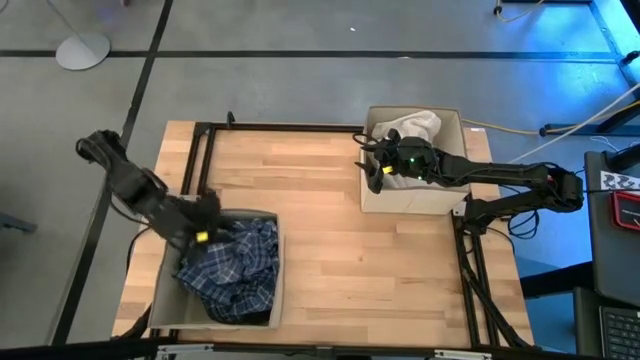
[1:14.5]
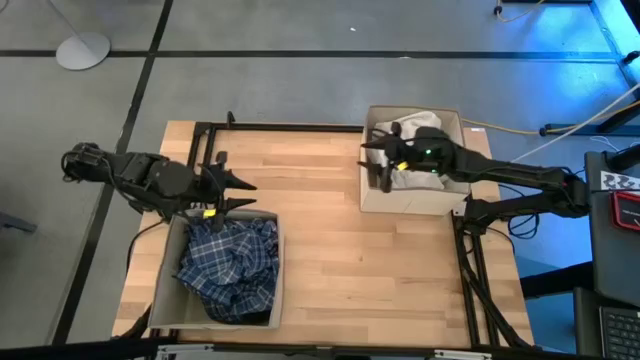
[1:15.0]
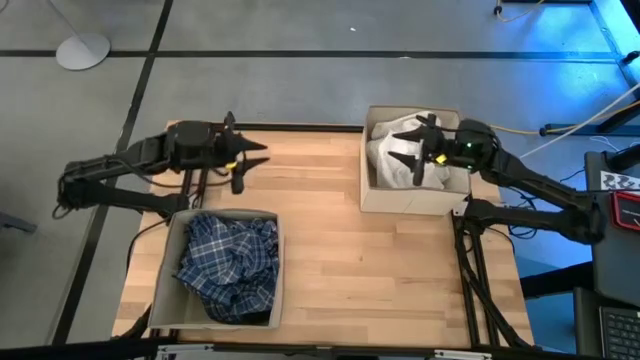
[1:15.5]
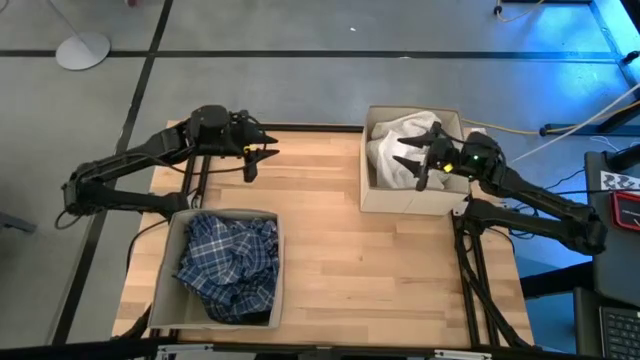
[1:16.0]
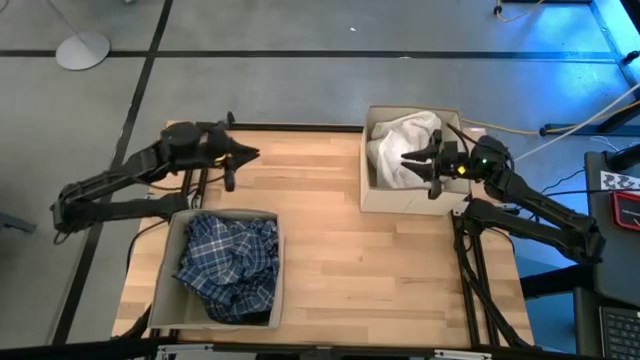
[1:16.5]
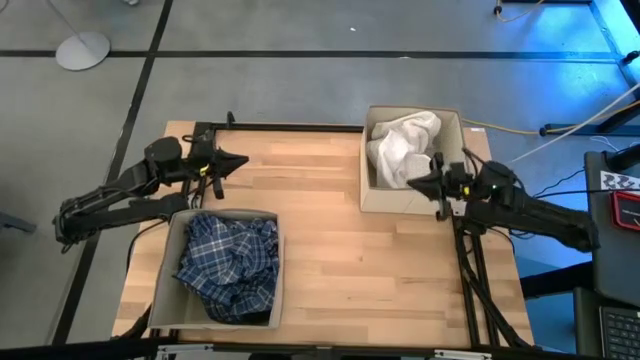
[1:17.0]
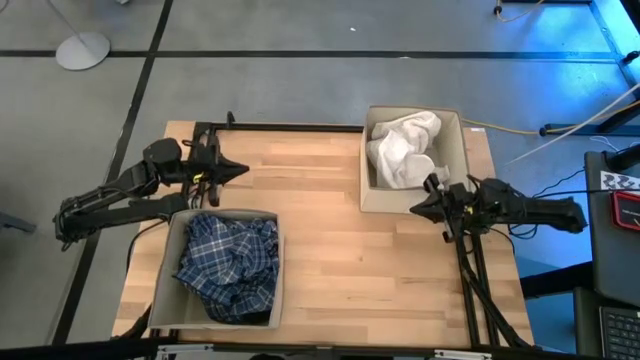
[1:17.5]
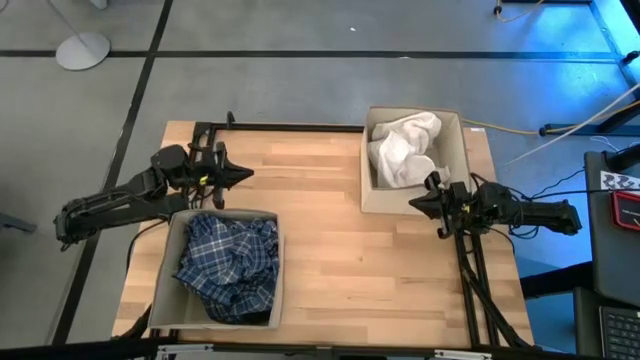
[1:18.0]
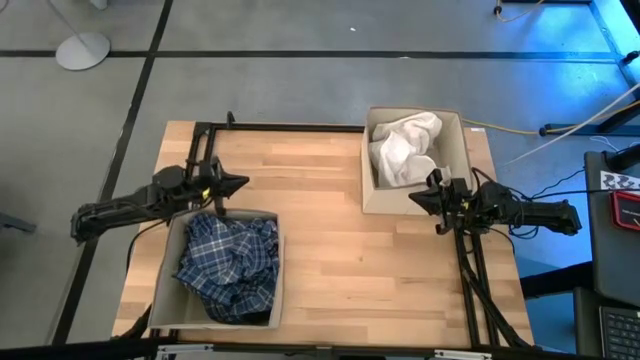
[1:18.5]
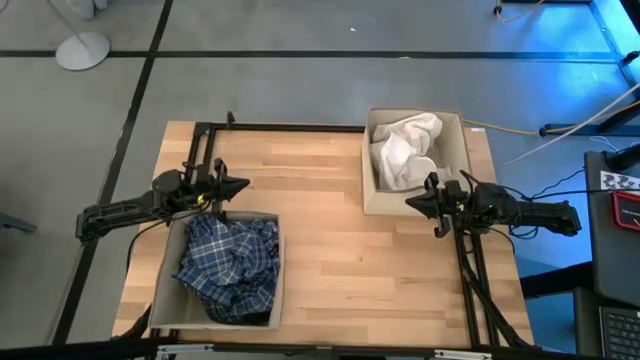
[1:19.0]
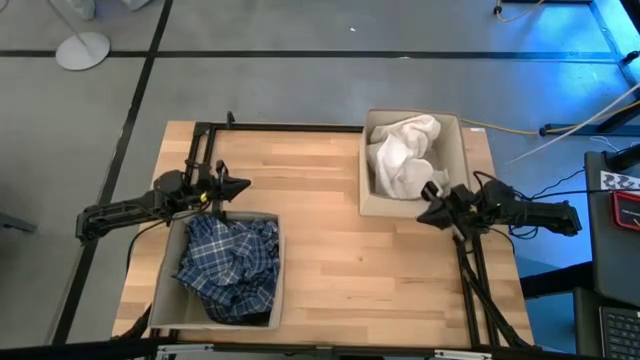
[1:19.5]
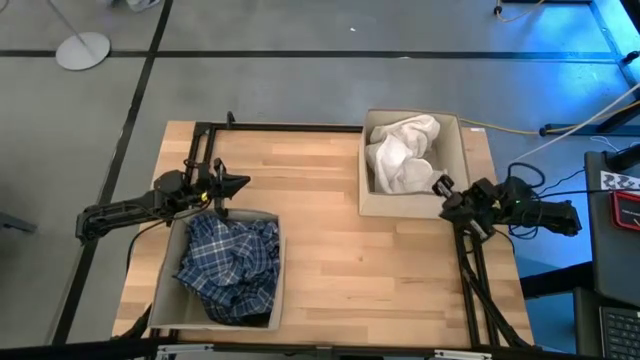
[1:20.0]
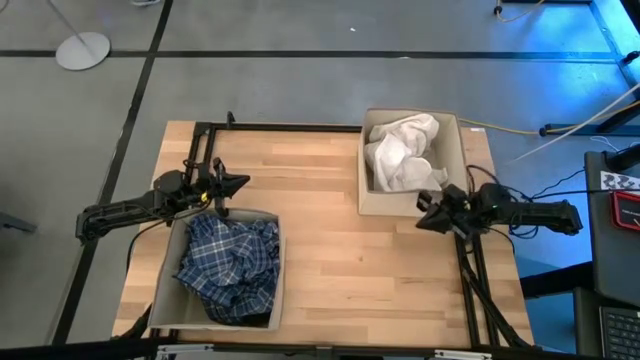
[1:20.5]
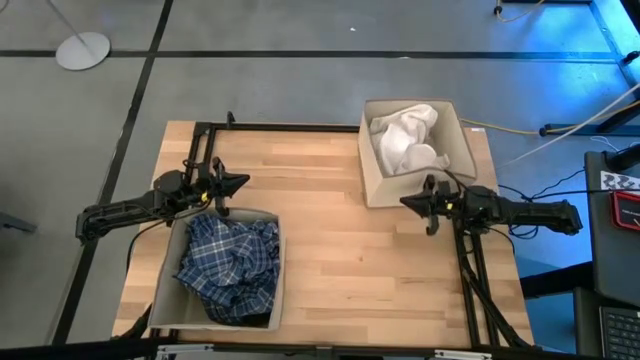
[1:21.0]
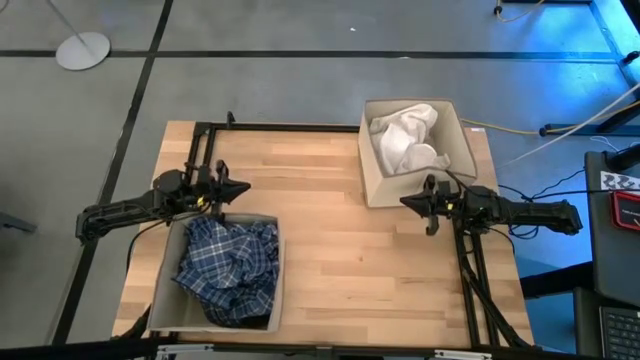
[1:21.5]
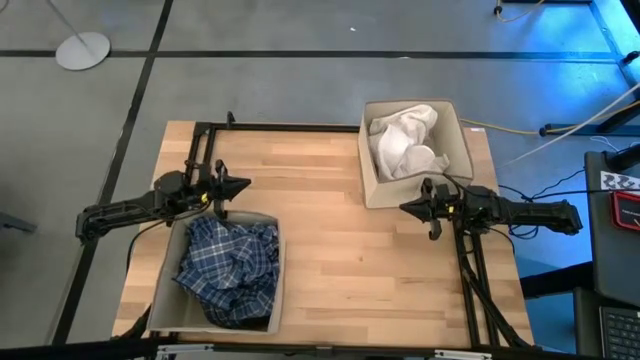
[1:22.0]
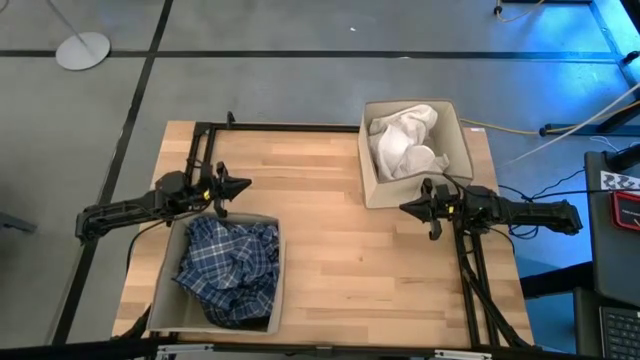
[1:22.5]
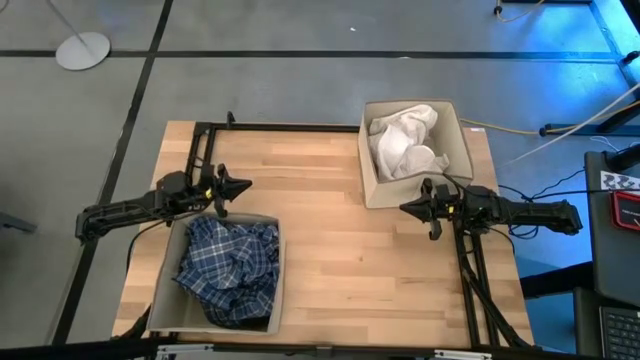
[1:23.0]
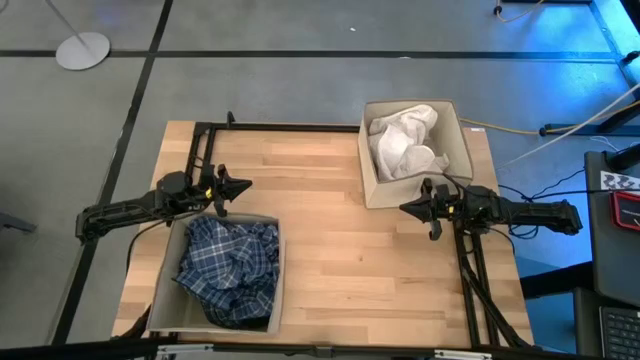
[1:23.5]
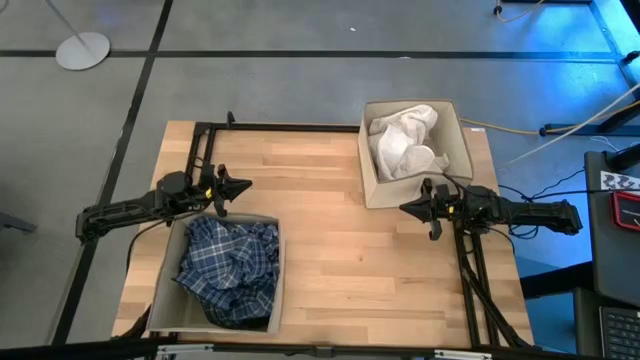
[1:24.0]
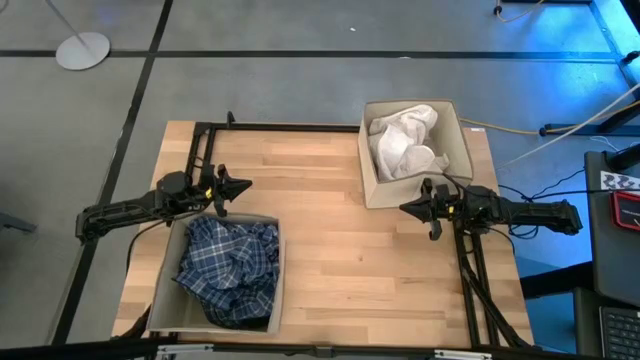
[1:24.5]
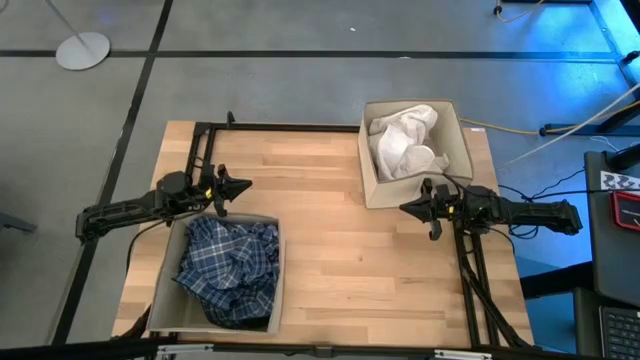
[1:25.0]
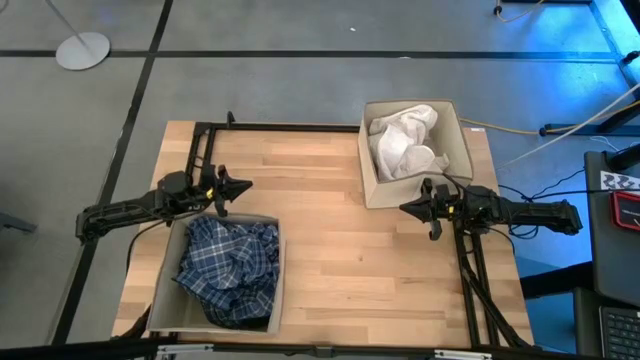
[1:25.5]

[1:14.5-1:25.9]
Task: Sort clothes
Return to Home Position

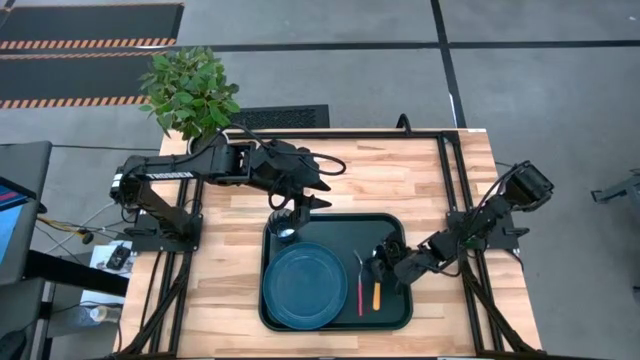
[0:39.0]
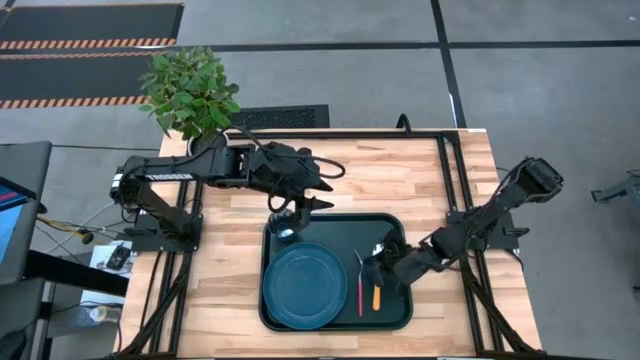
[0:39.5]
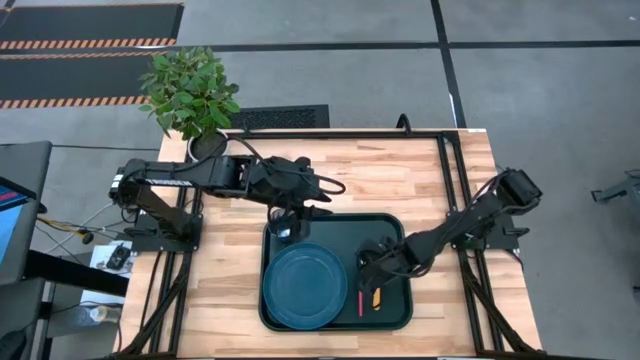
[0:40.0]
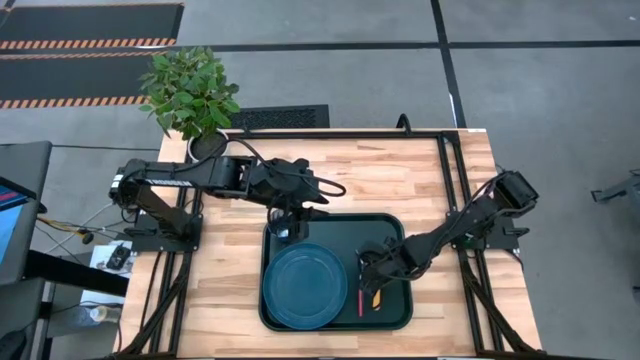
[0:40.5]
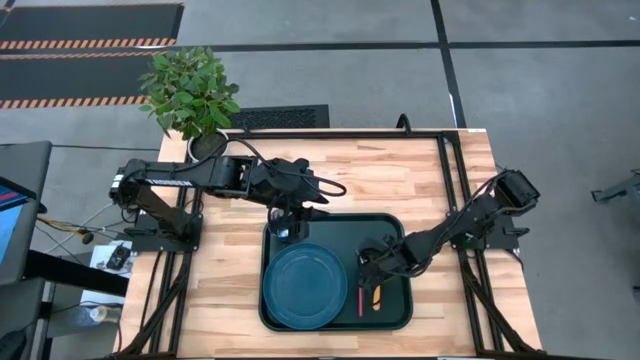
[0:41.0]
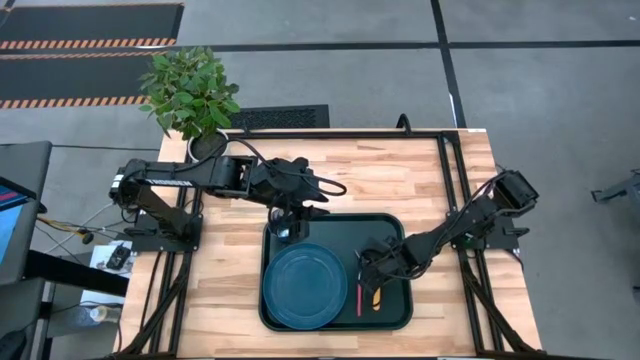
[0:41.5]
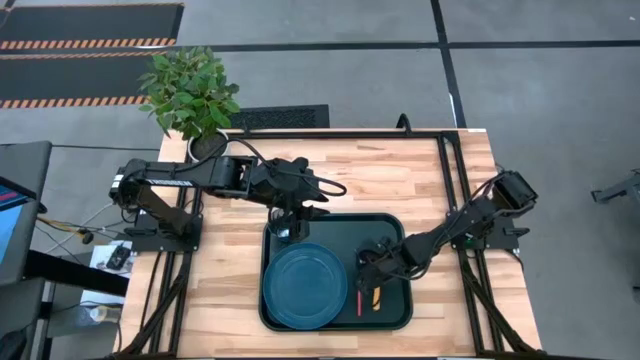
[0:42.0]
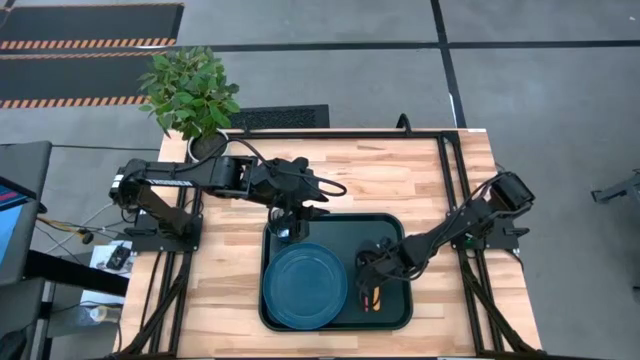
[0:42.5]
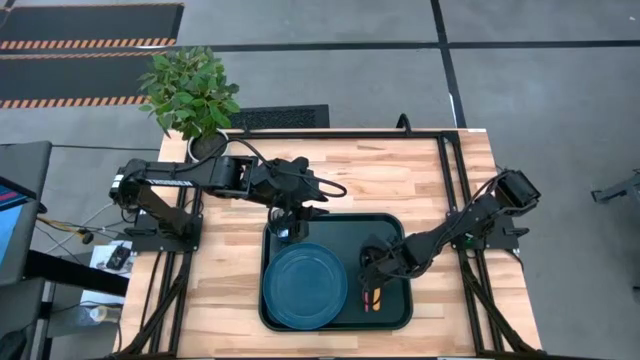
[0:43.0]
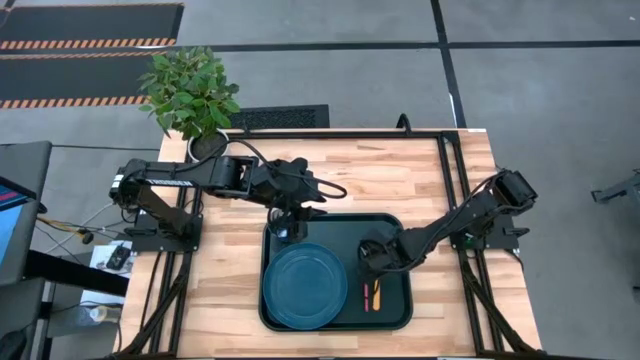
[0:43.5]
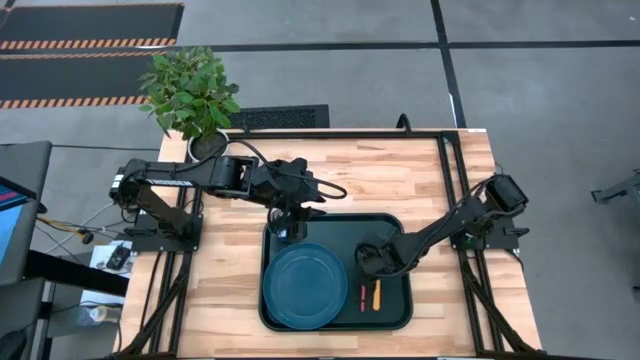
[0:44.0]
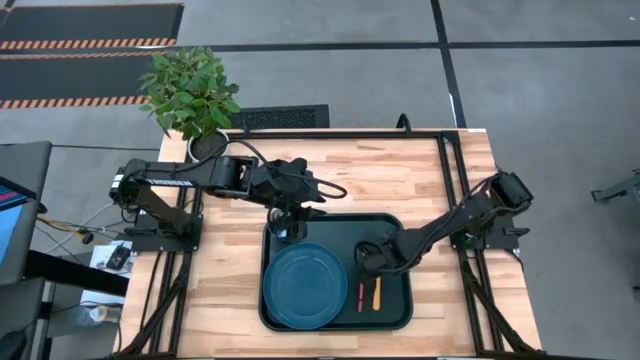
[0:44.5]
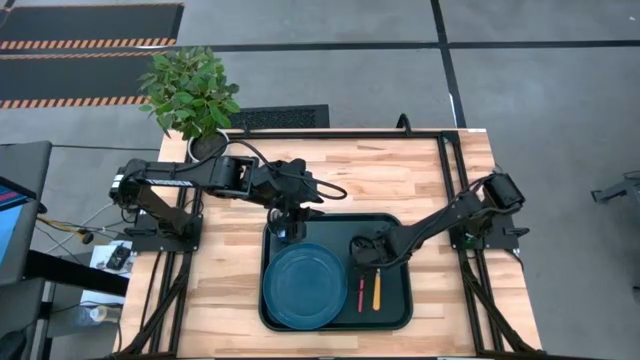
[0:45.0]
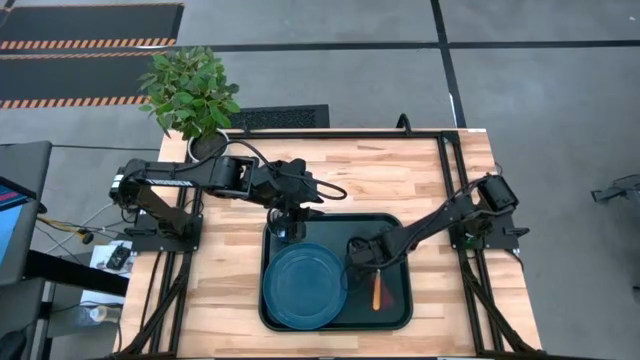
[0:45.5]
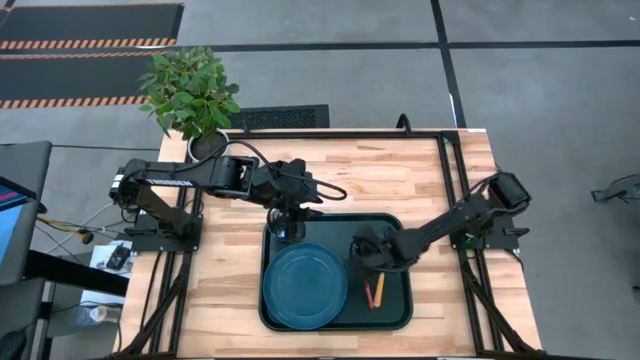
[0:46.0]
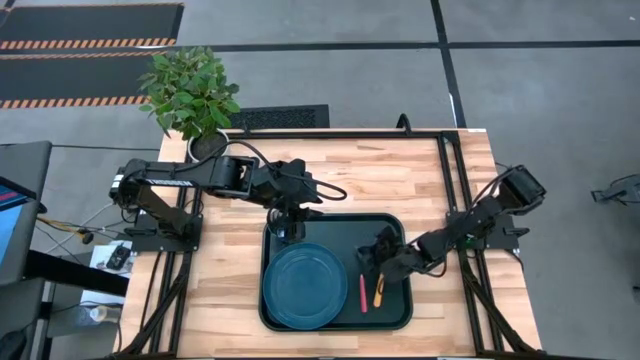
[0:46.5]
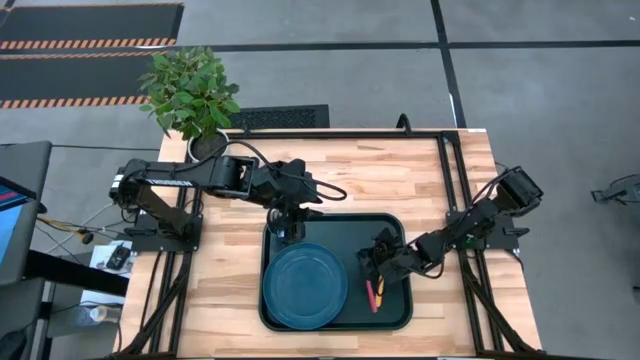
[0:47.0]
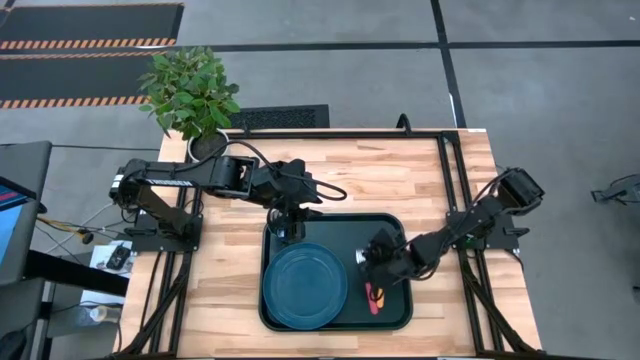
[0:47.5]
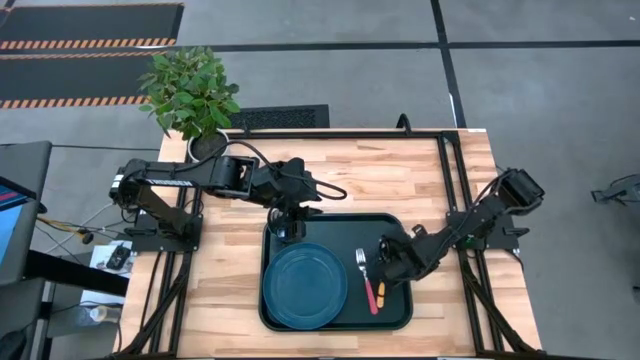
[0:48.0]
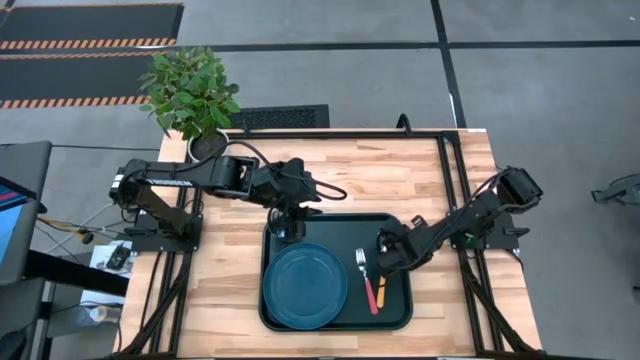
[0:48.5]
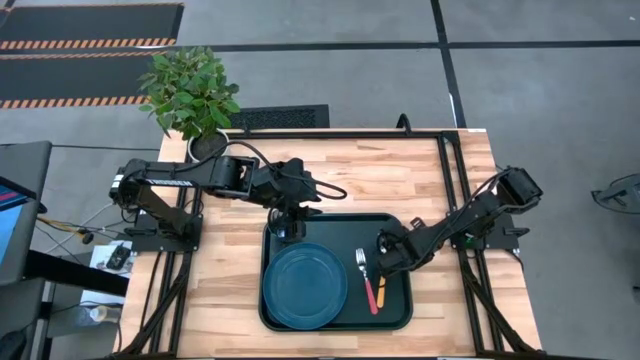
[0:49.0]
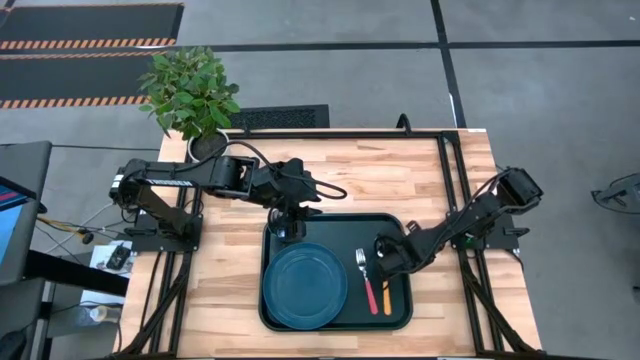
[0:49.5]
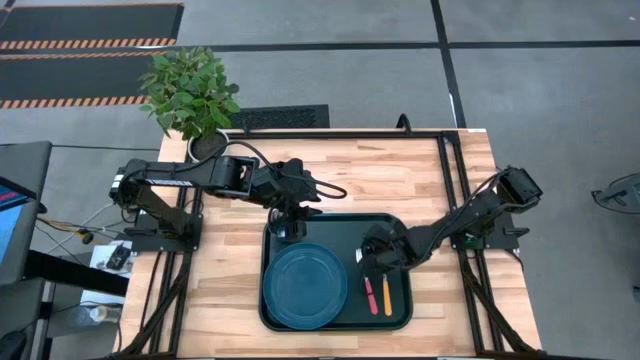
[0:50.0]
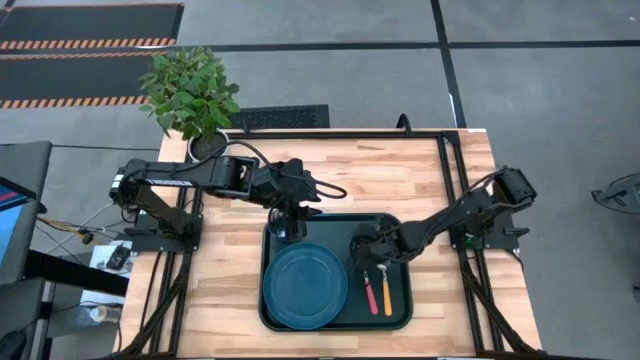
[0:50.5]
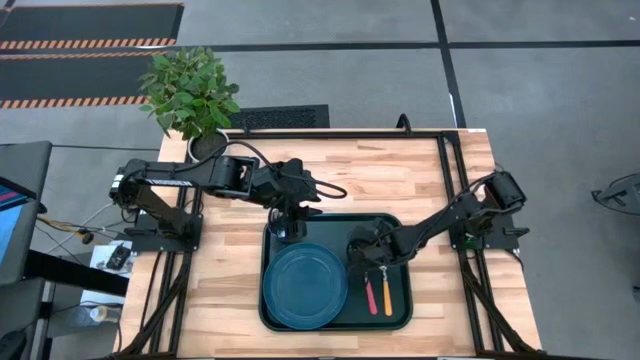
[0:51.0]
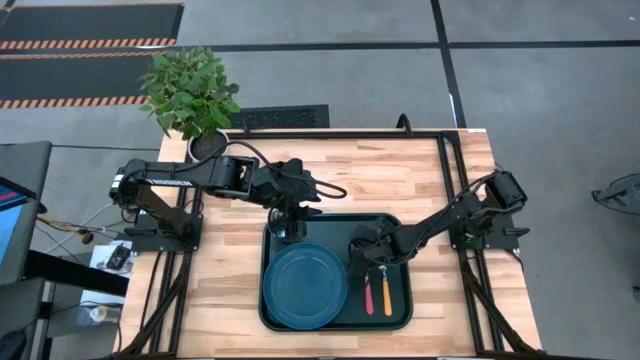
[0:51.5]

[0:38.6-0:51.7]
Task: Pick and place plate/cup/fork/spoon on tray
Put the pink fork on the black serving tray to the left of the brown spoon
